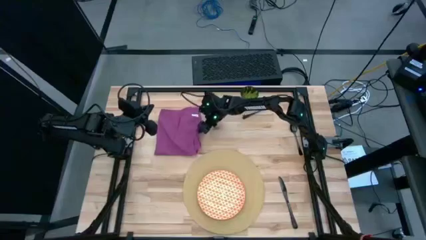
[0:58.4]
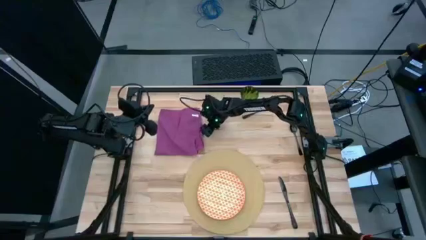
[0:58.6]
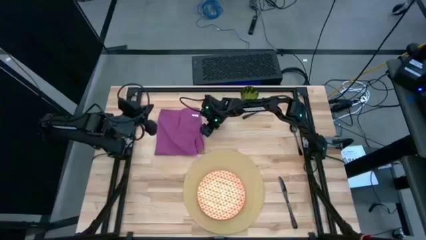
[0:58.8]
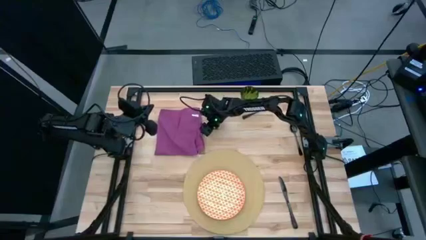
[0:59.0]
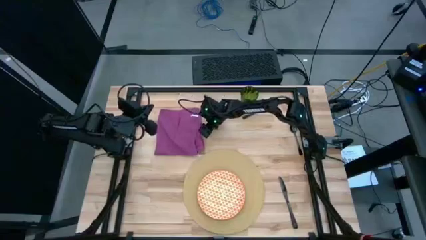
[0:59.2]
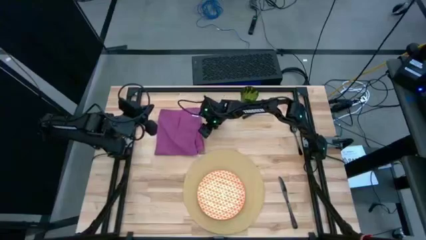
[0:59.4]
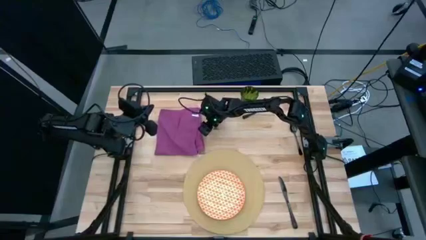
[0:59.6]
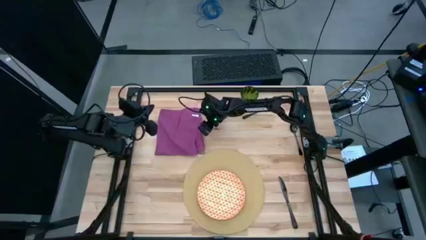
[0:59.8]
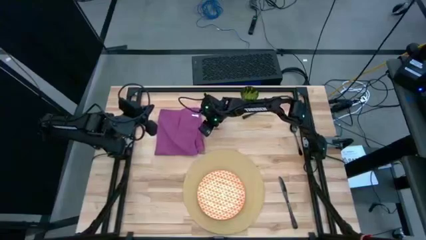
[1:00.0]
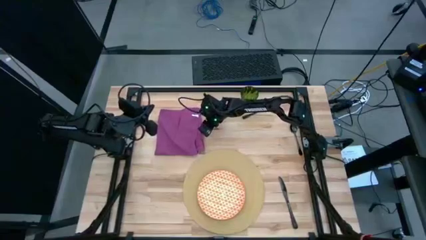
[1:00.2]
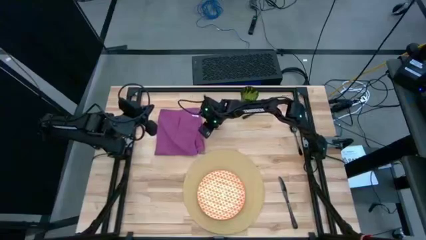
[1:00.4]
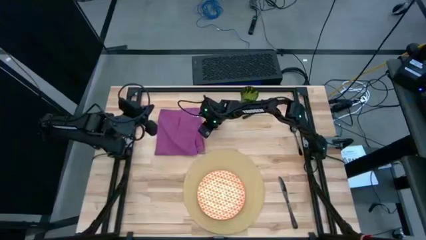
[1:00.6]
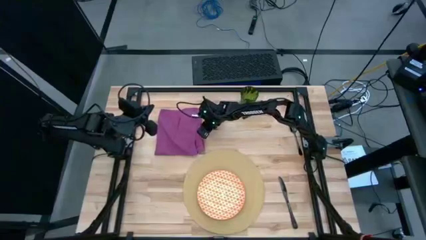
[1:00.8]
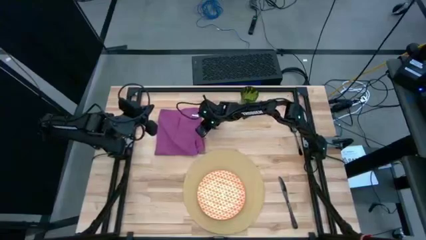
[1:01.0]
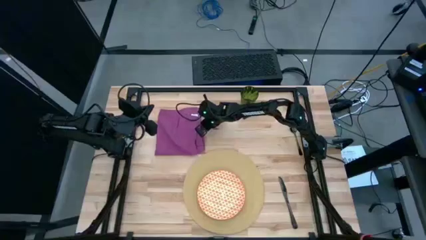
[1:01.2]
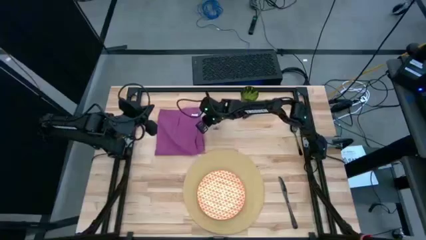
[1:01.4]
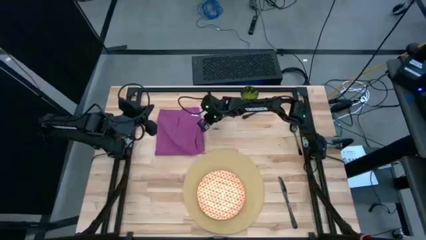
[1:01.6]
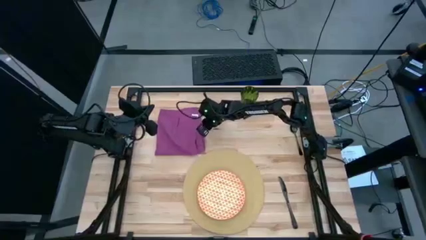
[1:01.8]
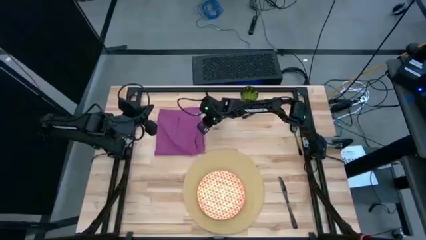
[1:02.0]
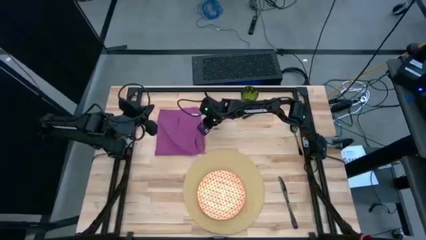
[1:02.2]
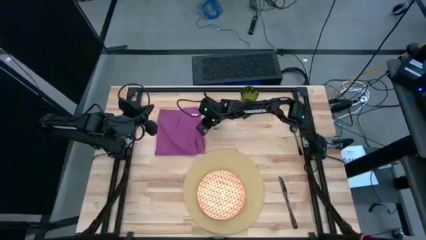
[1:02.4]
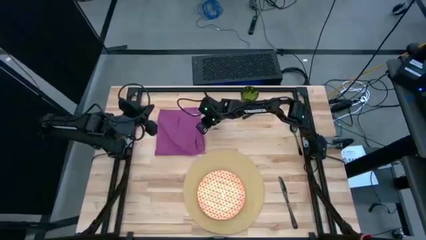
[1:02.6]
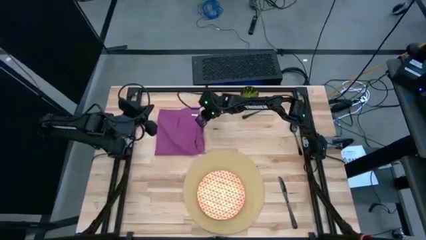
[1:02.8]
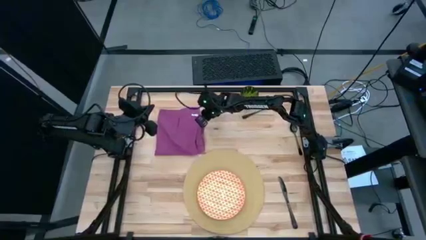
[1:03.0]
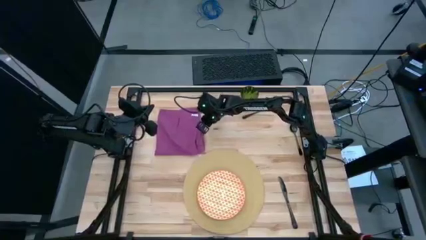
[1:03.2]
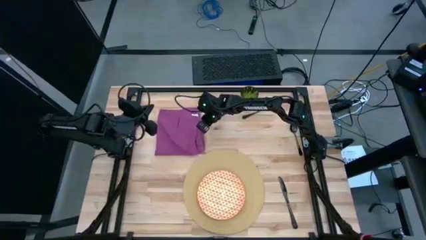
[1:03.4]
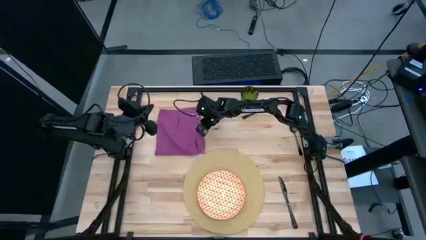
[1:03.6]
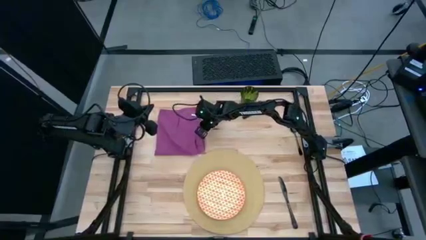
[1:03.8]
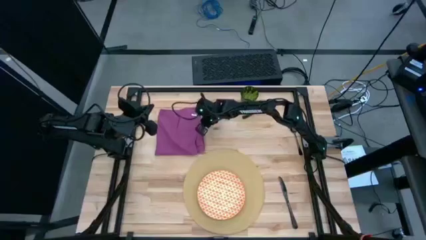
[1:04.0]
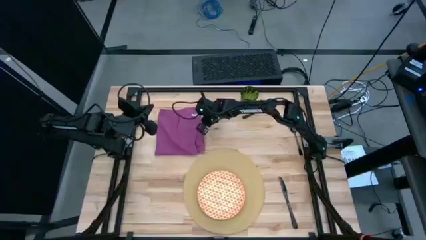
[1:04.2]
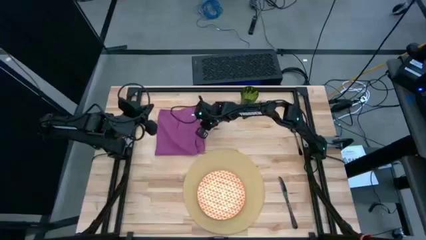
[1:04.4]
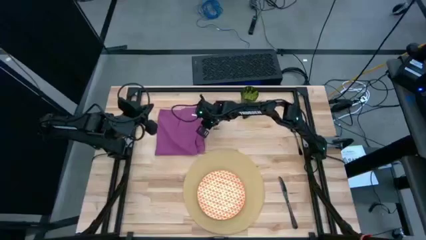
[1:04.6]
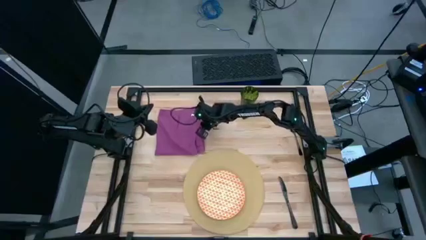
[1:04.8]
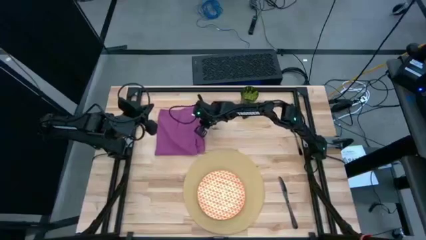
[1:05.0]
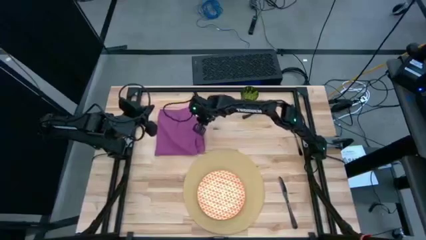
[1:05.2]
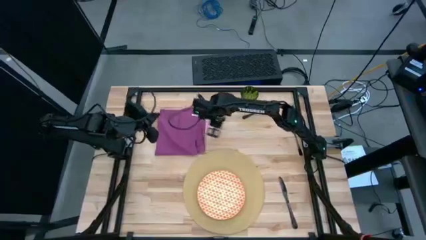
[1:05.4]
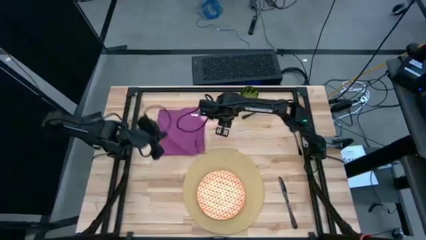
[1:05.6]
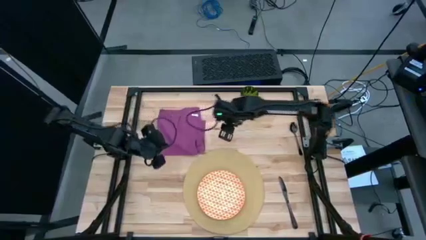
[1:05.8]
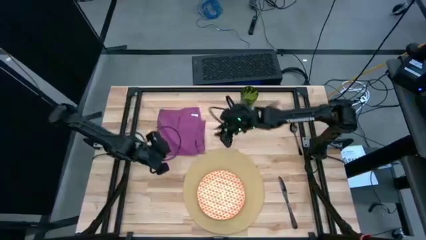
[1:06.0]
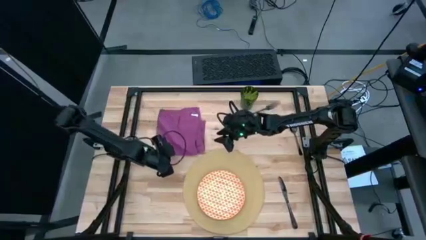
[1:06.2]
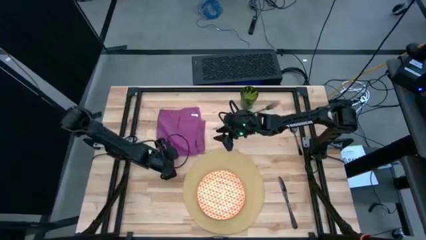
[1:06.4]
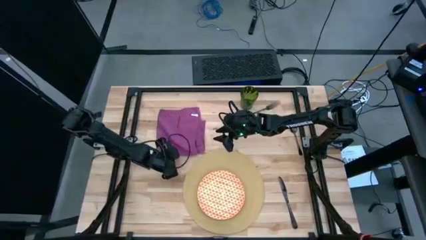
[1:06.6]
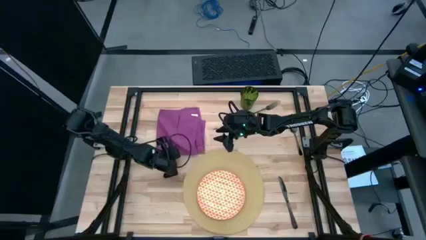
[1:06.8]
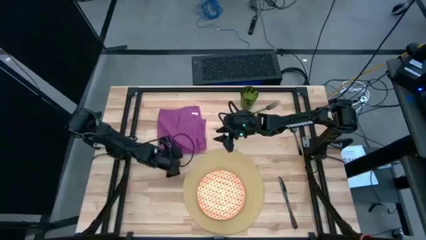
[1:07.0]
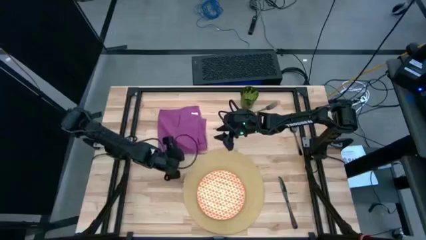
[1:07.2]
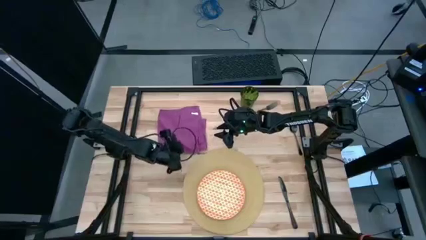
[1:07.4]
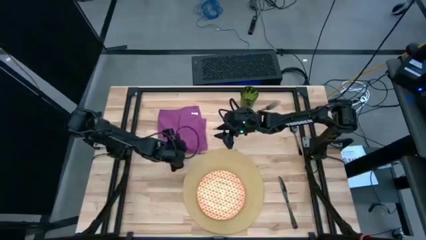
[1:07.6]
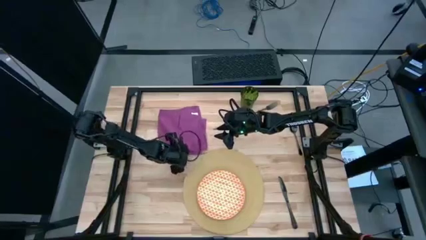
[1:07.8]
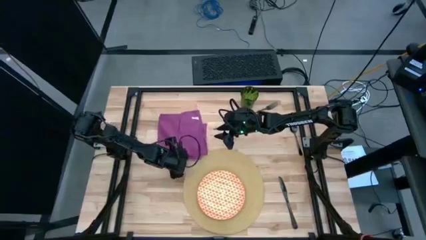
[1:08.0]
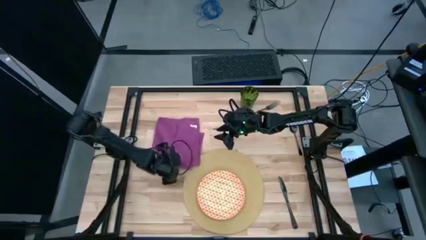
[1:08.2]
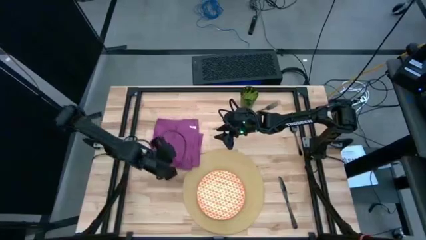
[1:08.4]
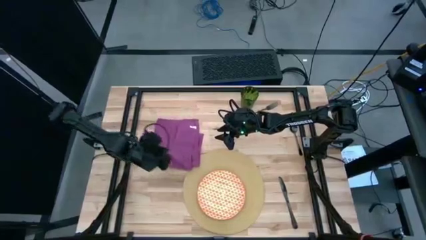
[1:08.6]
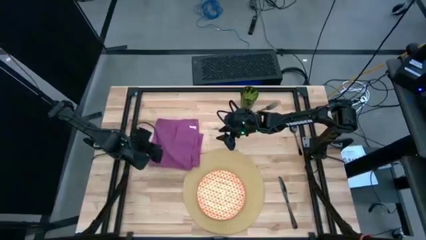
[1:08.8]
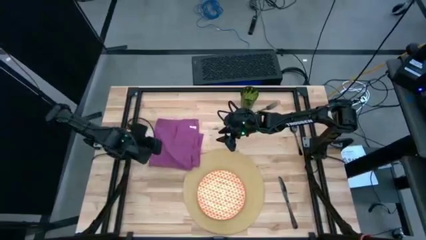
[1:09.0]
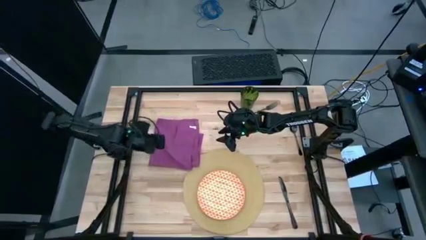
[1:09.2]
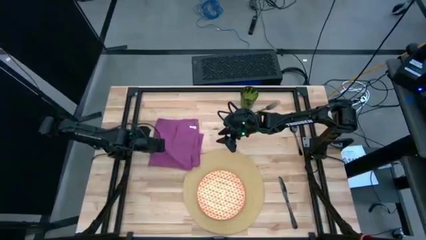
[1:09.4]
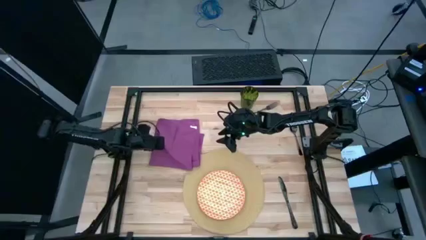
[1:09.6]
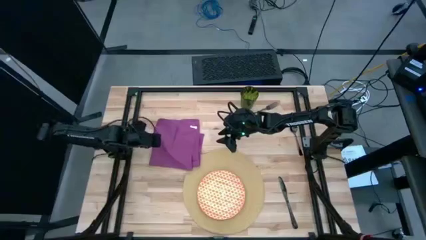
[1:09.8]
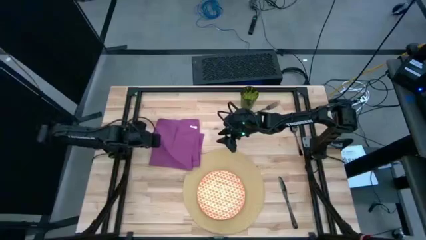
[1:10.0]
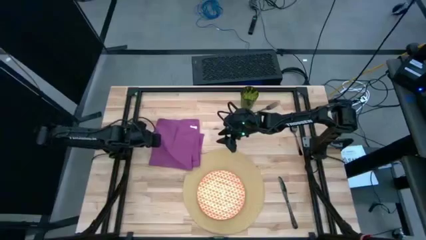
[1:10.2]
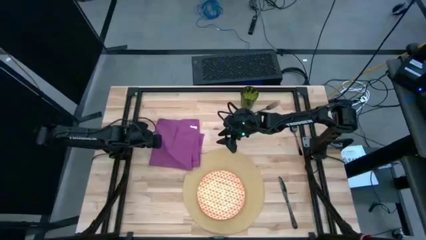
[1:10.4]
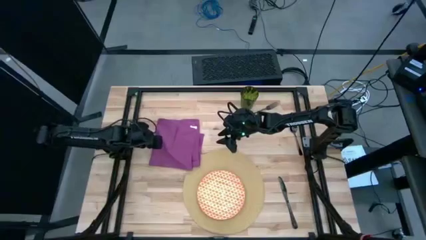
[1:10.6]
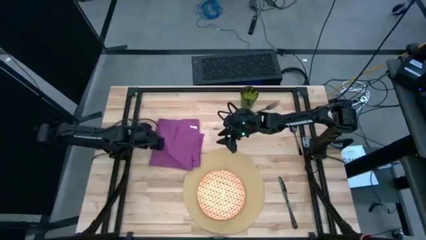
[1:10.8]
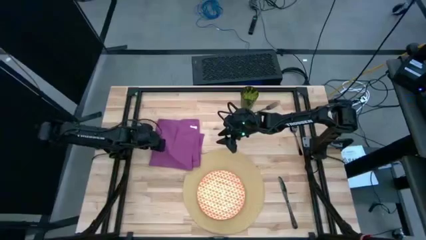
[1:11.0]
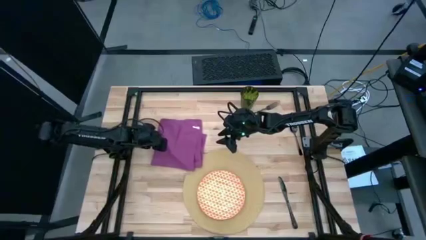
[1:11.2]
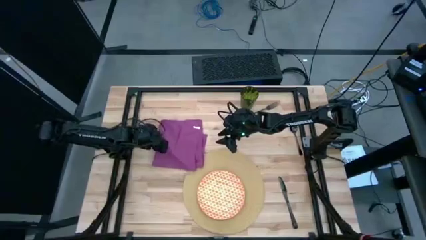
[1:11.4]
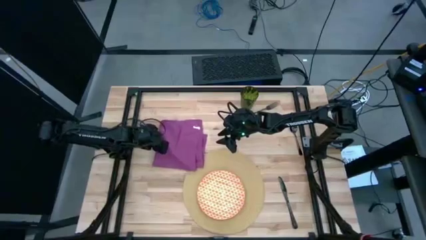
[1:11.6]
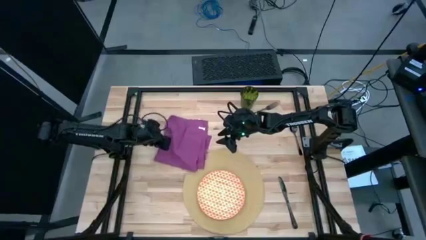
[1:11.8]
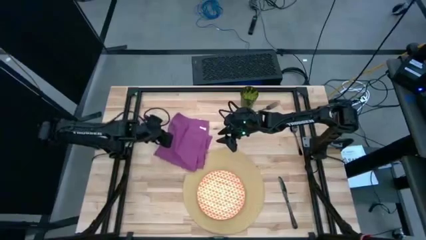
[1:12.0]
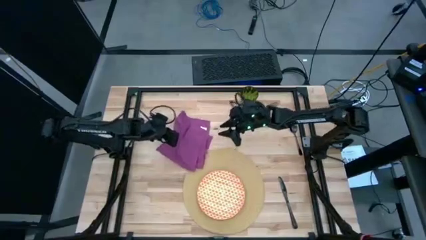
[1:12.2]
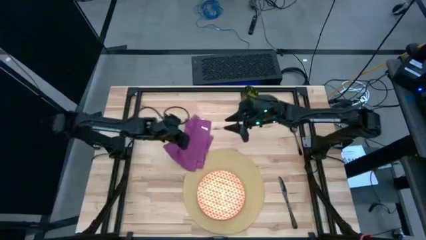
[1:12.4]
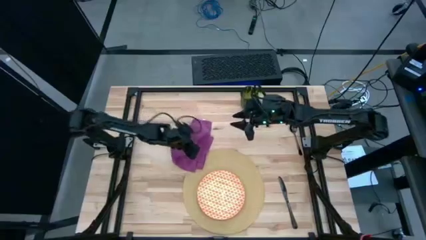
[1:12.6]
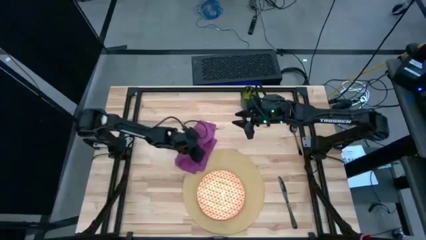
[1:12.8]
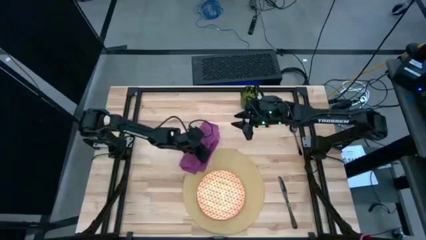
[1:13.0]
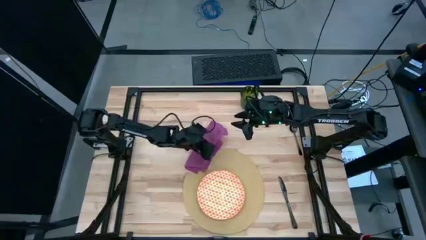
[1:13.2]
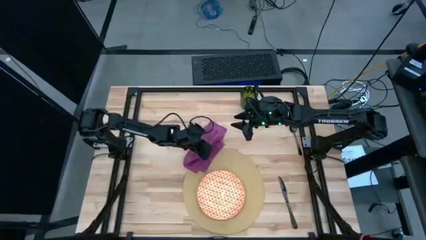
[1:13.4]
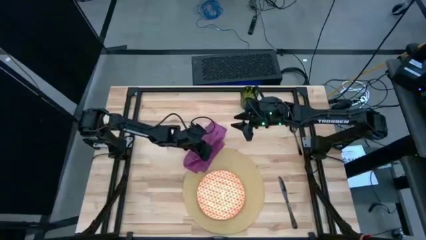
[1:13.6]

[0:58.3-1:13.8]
Task: Set table place
Fold the purple table napkin
